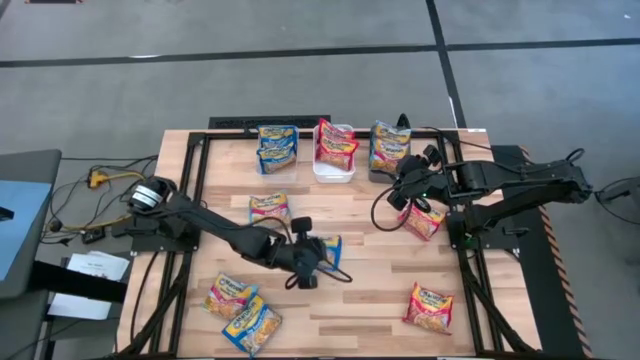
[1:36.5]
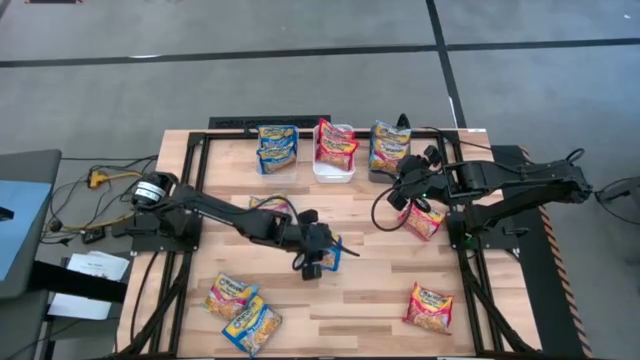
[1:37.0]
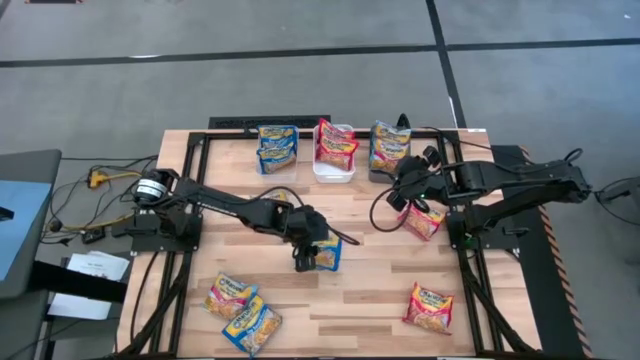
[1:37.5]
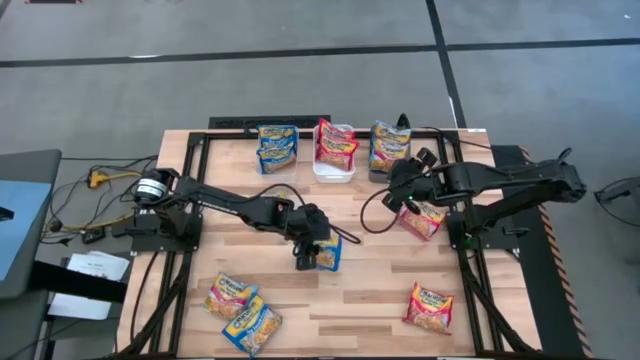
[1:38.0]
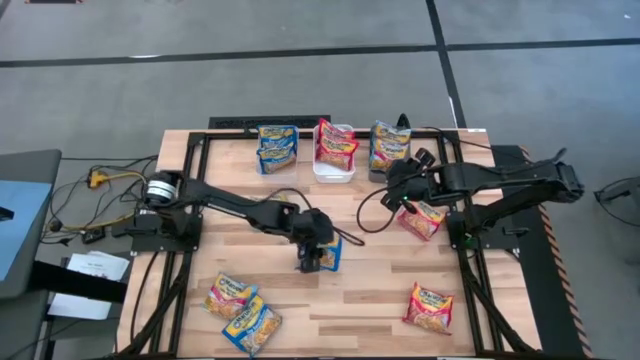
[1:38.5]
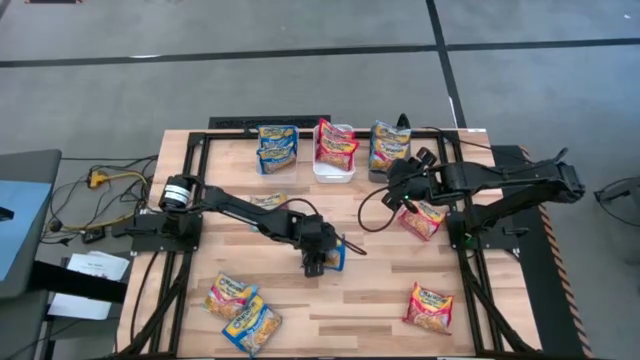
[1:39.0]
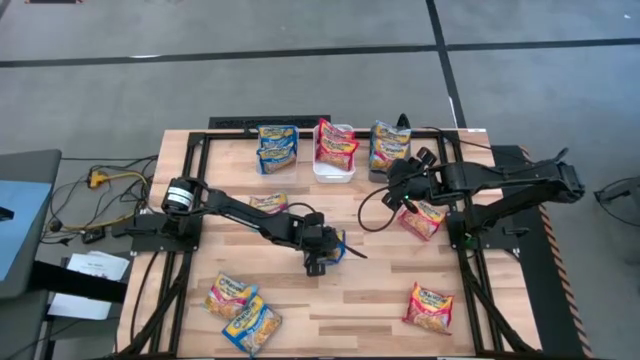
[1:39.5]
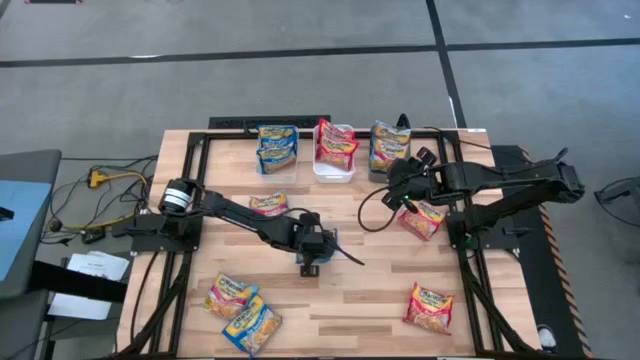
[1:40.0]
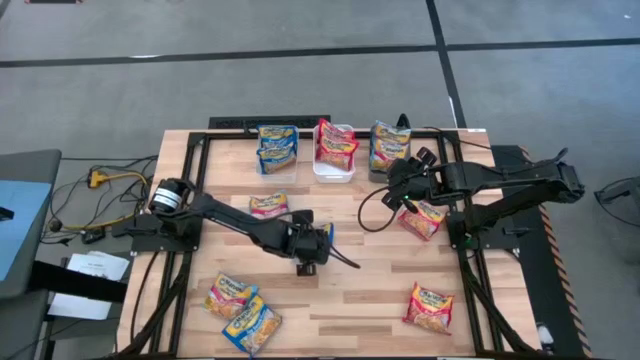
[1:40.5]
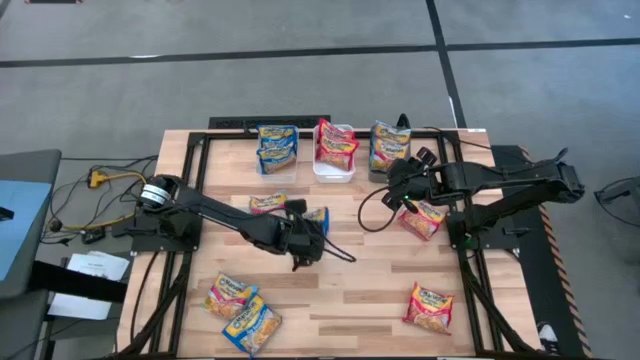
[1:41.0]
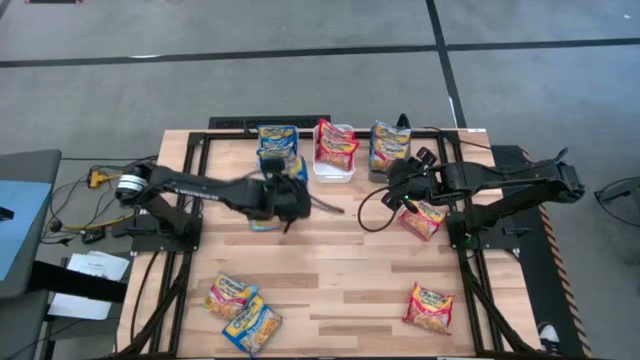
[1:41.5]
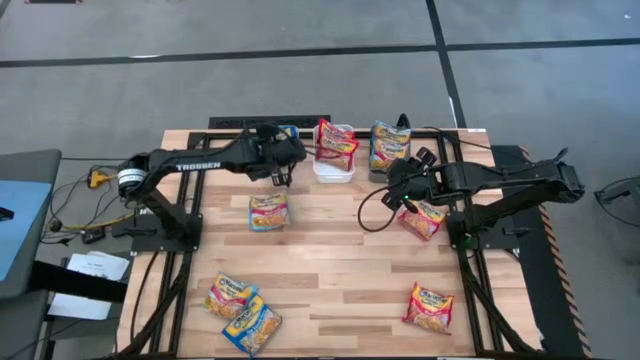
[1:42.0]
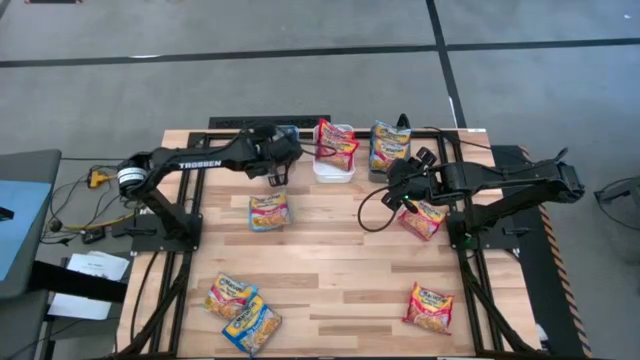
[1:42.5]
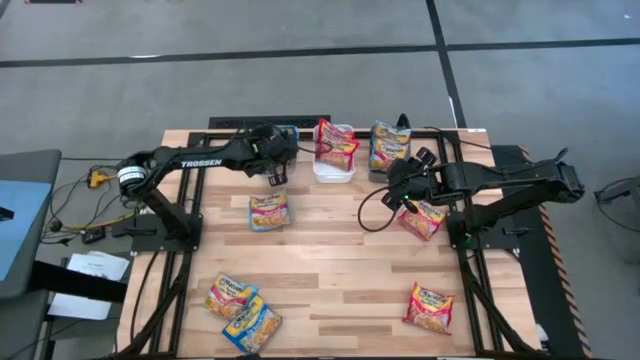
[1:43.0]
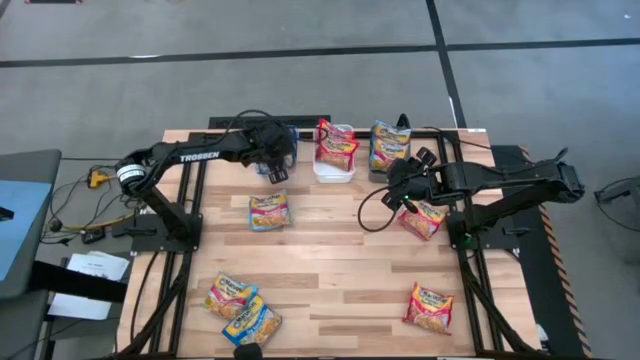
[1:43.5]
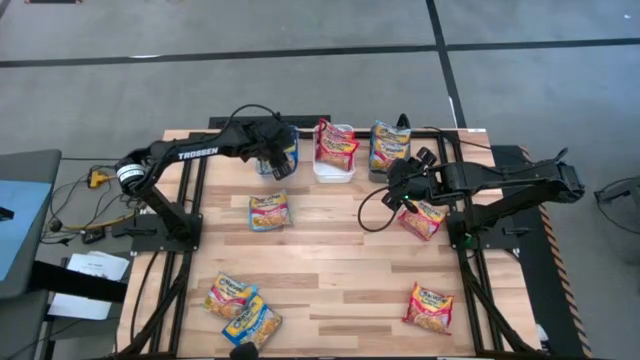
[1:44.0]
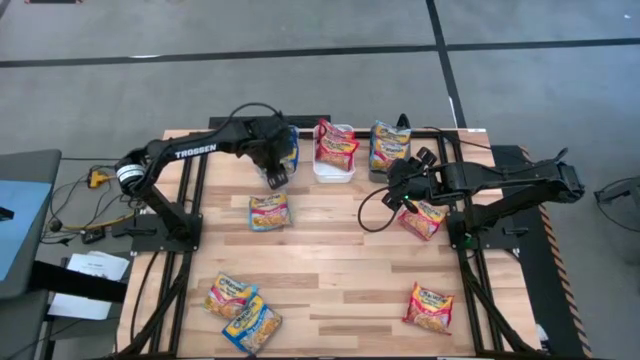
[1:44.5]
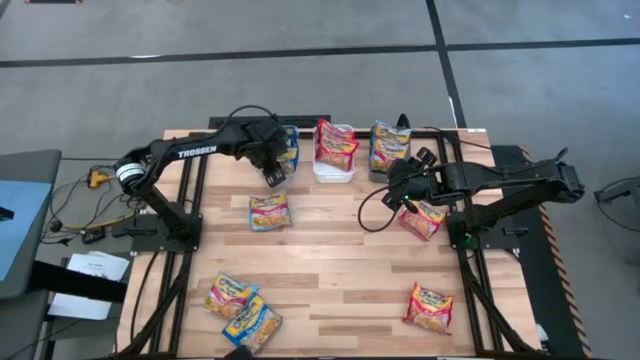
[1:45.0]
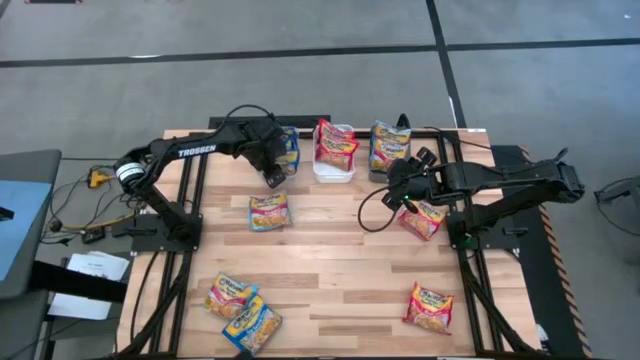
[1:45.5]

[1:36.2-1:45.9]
Task: Sort Maruchan noodles
Put the blue noodle pack into the transparent bin

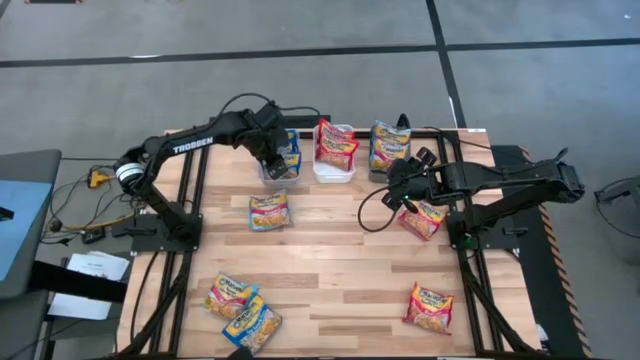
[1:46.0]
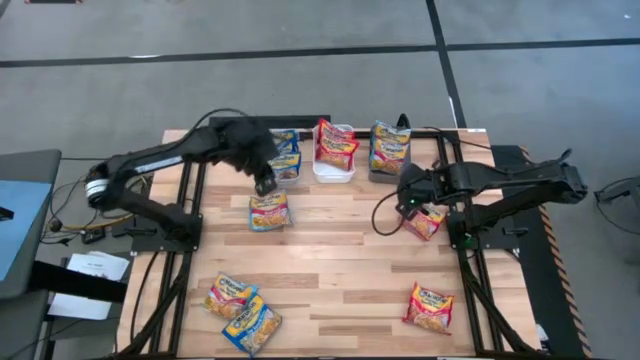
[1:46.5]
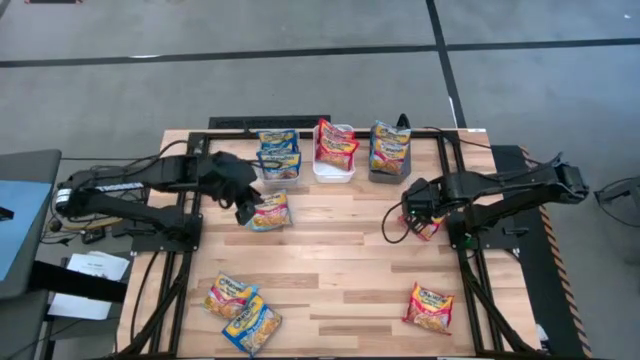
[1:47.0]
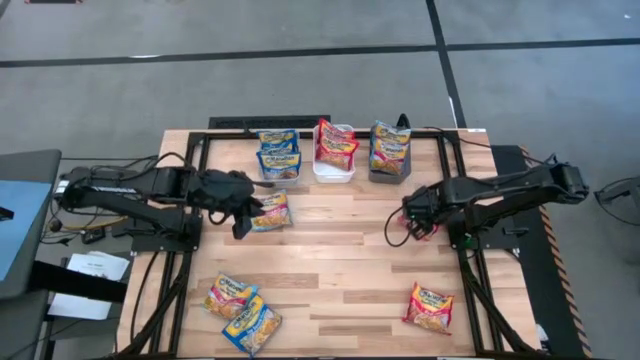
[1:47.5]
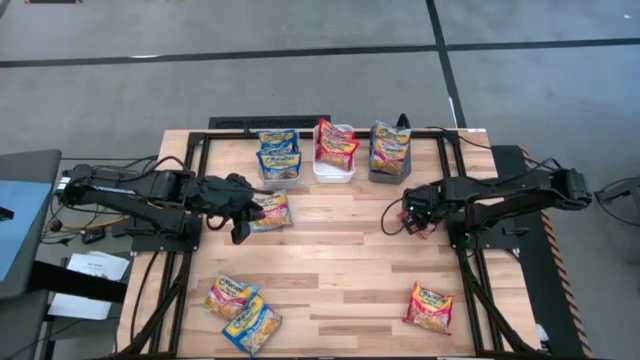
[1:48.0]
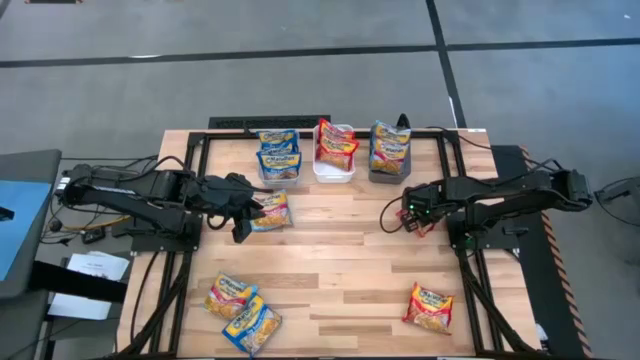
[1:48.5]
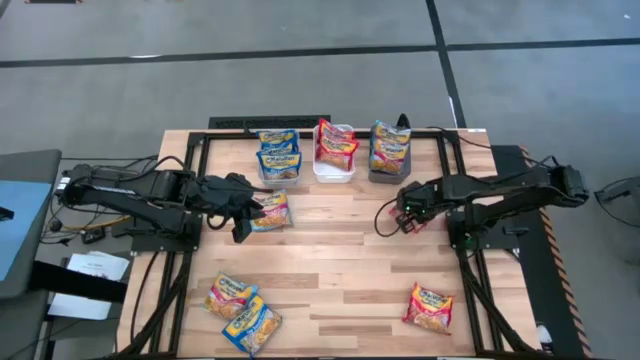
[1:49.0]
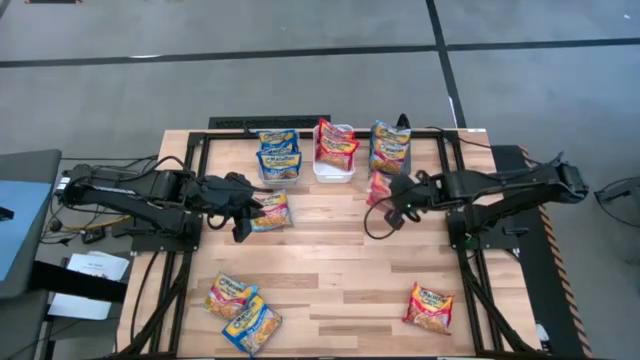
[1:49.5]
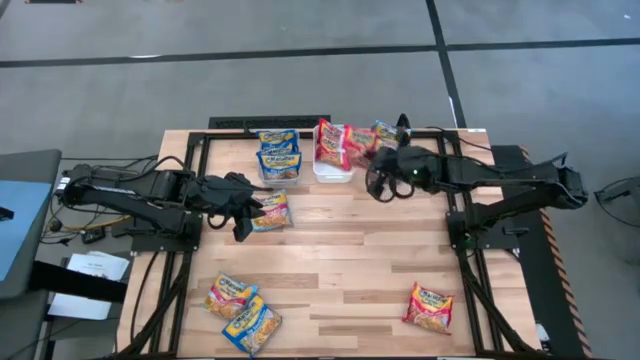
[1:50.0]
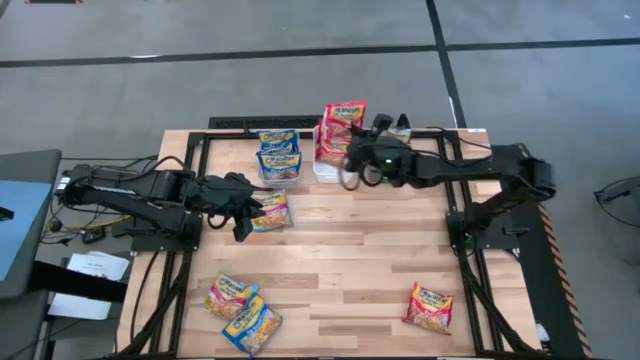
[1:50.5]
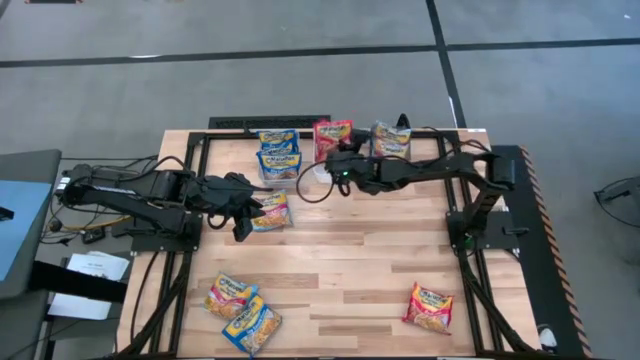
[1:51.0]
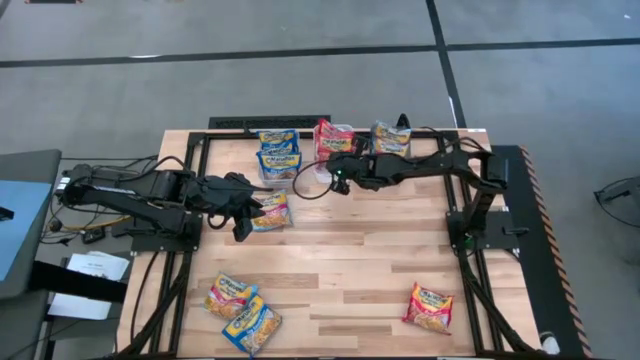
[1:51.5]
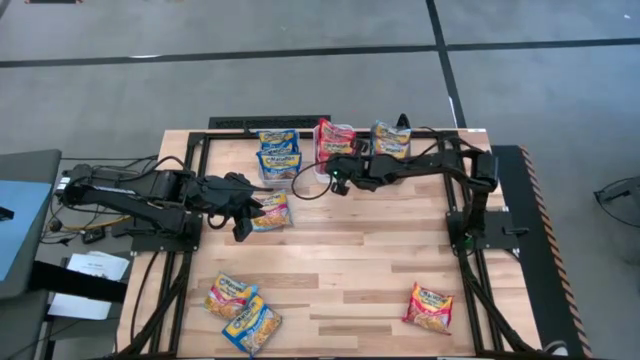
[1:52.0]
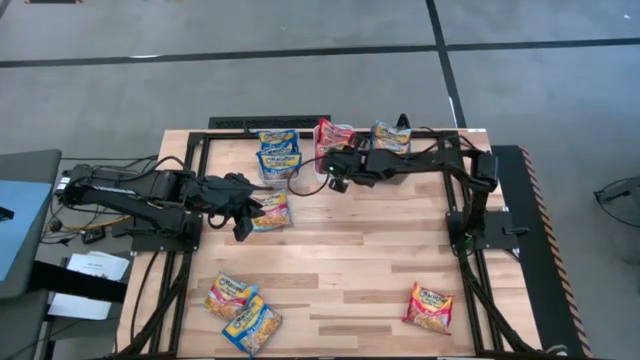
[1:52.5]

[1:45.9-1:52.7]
Put the red noodle pack into the white bin

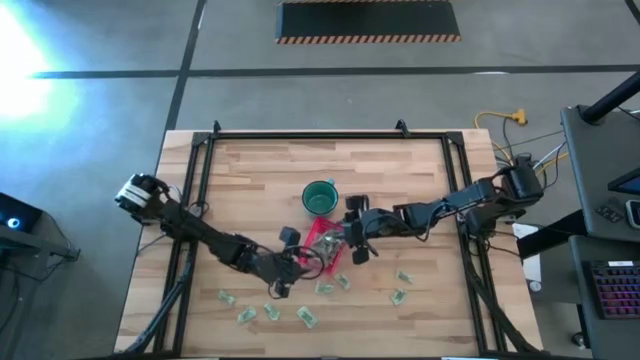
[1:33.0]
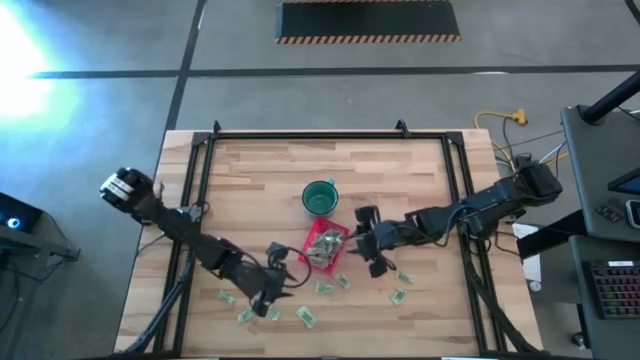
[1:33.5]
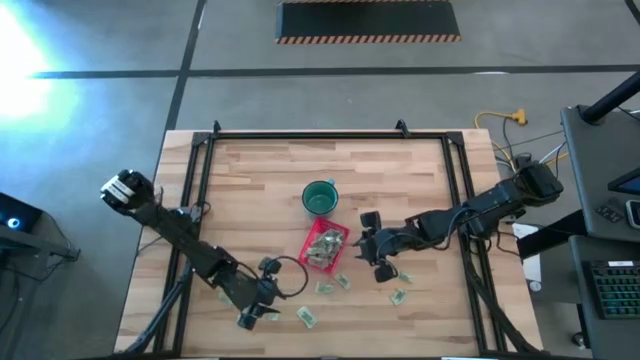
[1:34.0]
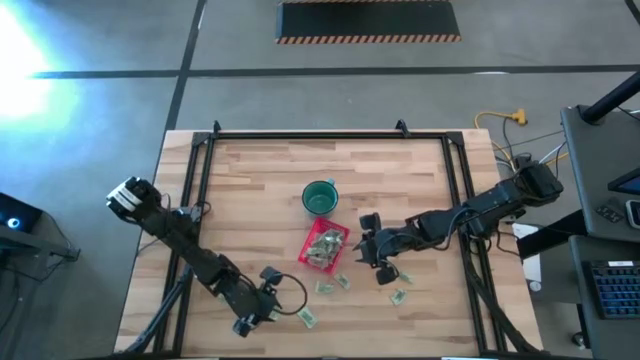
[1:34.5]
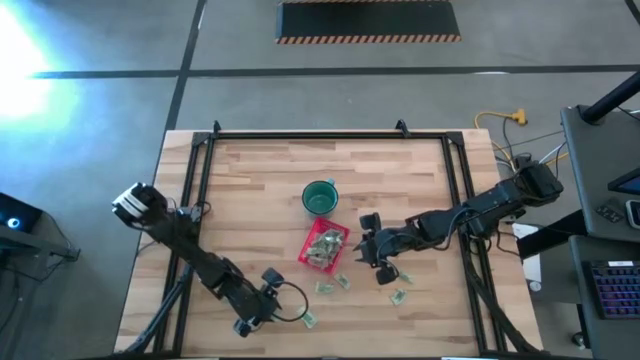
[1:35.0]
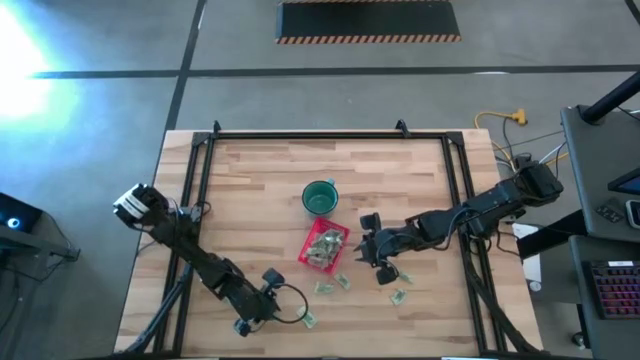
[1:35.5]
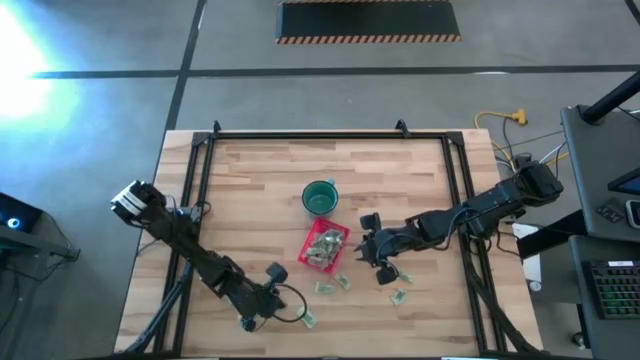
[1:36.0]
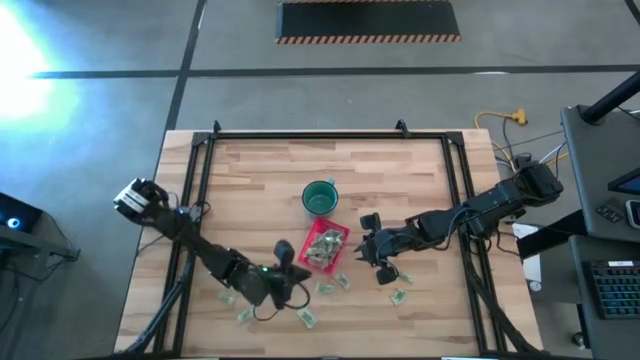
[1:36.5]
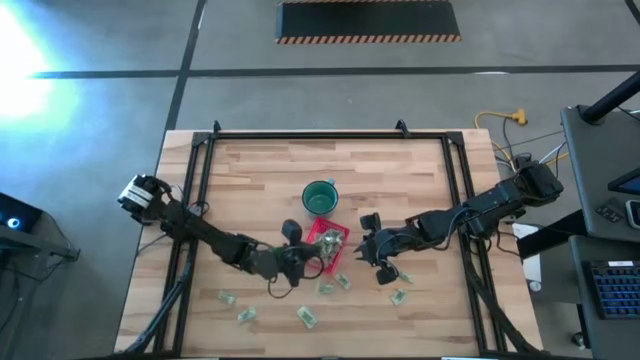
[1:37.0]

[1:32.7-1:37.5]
Task: Pick and place items into bin
Put the light green stevia packet into the red bin
